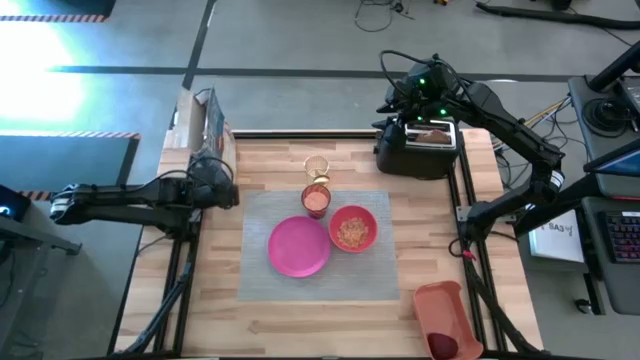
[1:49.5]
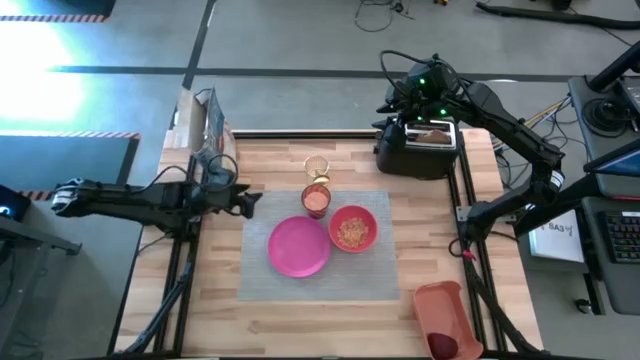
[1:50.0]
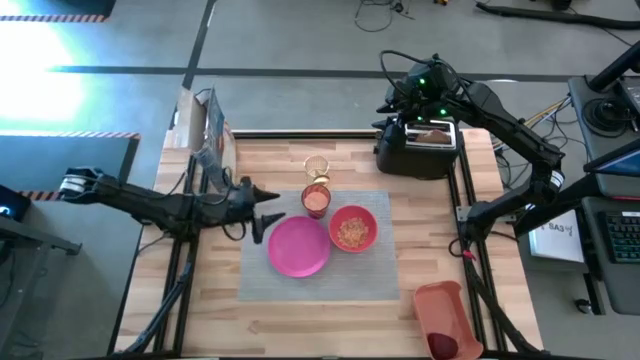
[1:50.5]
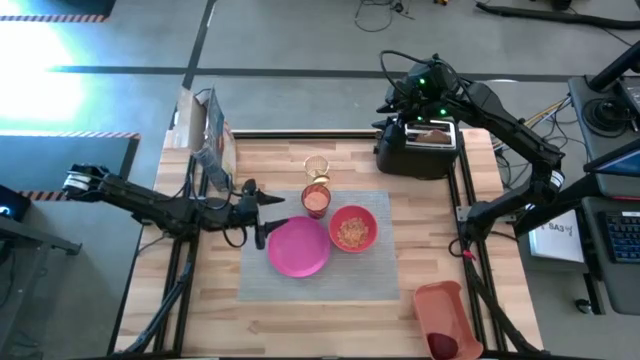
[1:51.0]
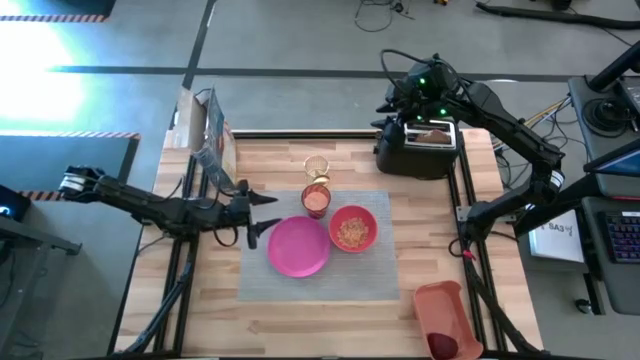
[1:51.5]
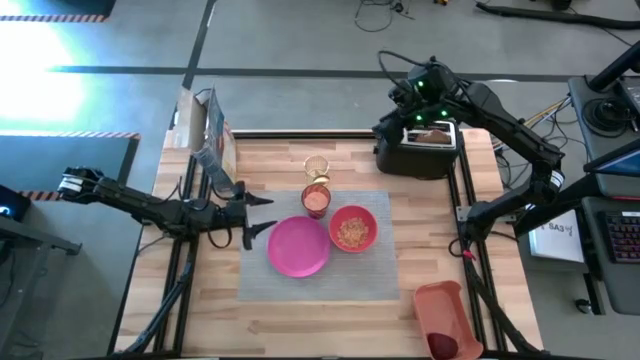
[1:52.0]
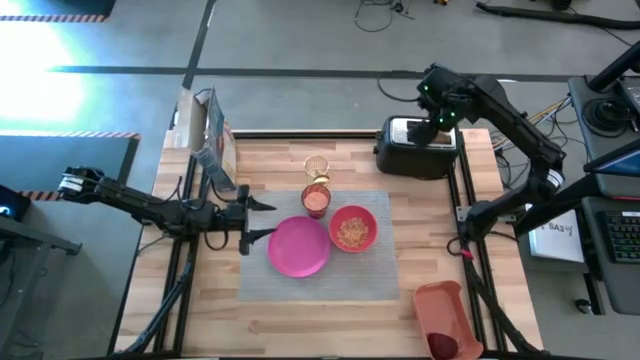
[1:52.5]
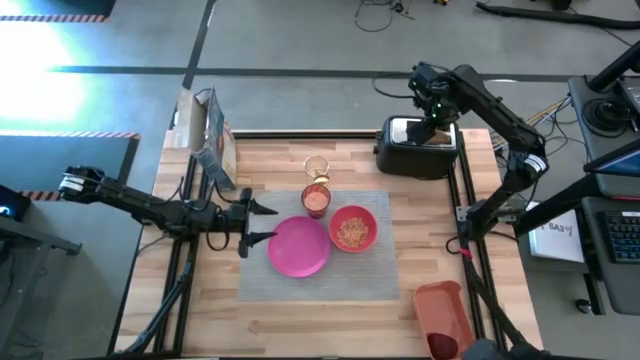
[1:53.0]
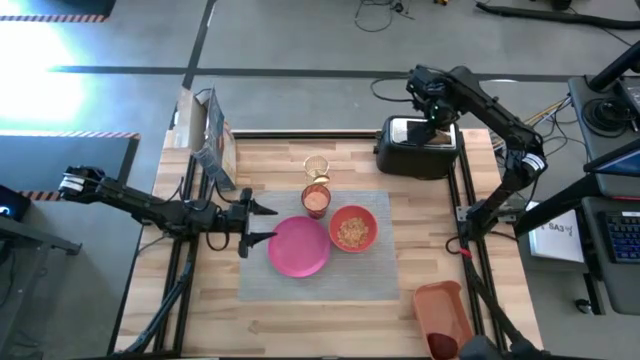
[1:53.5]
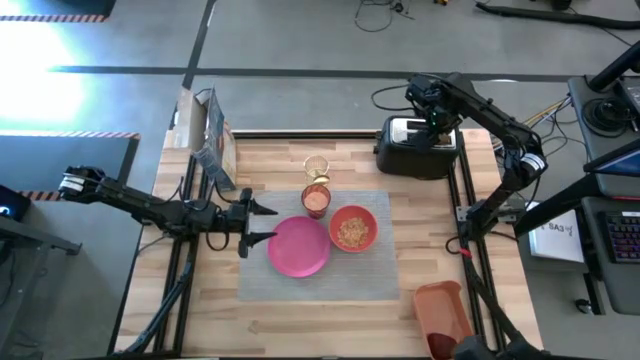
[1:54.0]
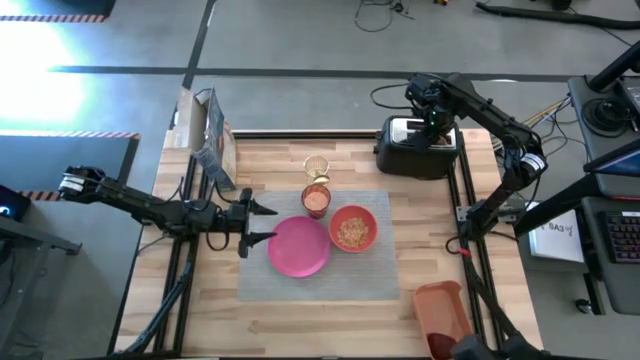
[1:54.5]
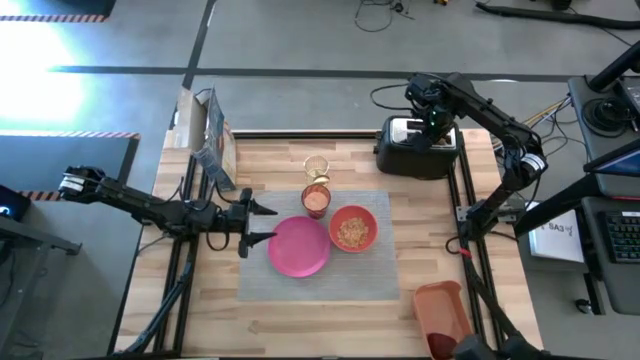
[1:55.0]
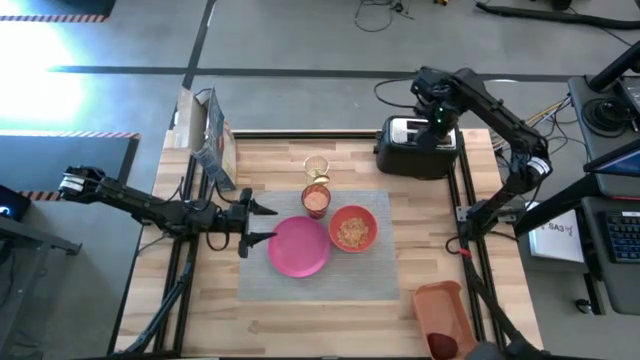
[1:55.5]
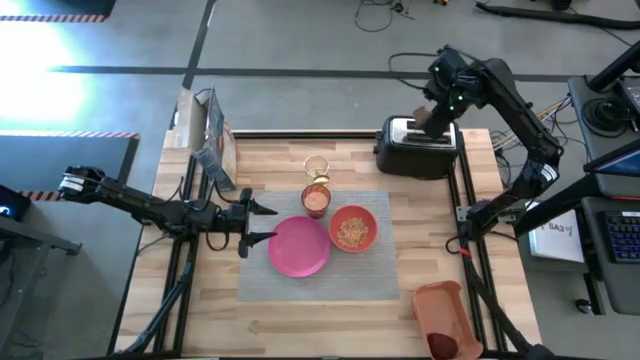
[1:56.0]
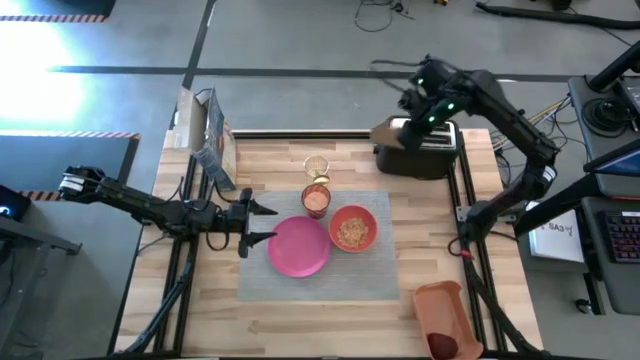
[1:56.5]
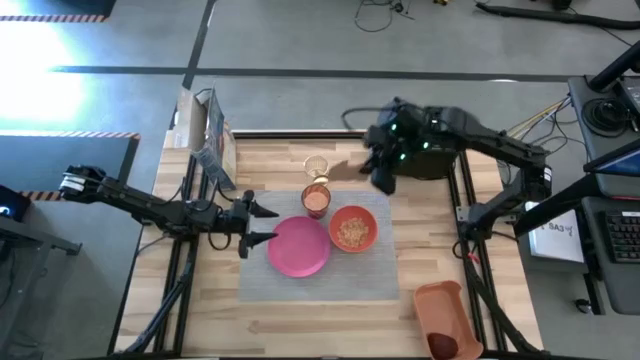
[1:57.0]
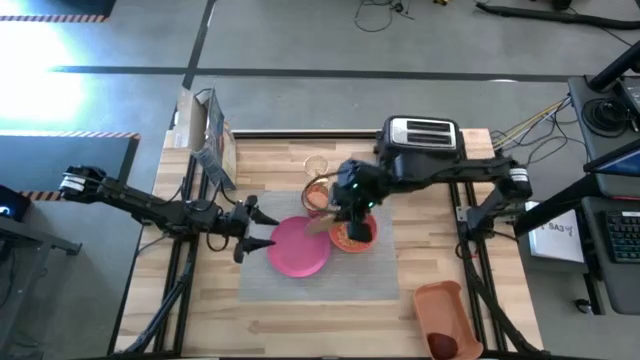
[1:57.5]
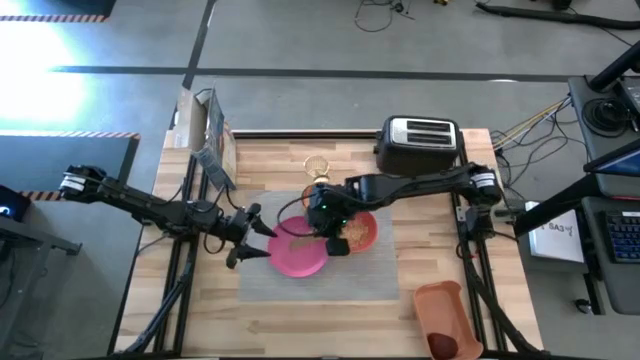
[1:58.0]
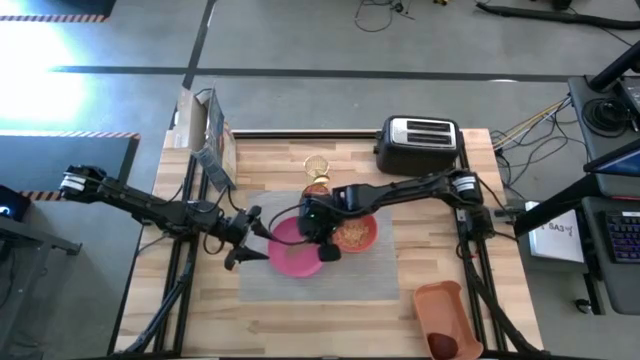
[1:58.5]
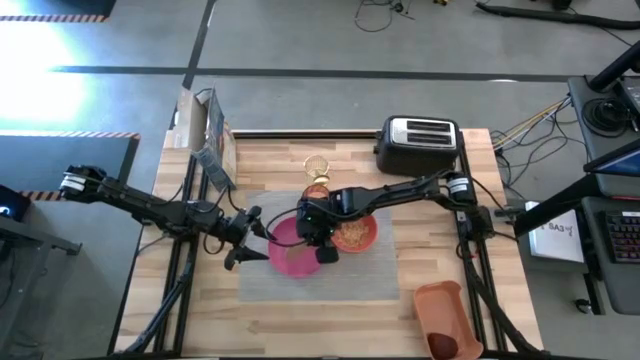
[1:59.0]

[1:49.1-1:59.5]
Task: Arrange a breakfast setting
Put the toasted bread from the toaster on the pink plate on the table mat

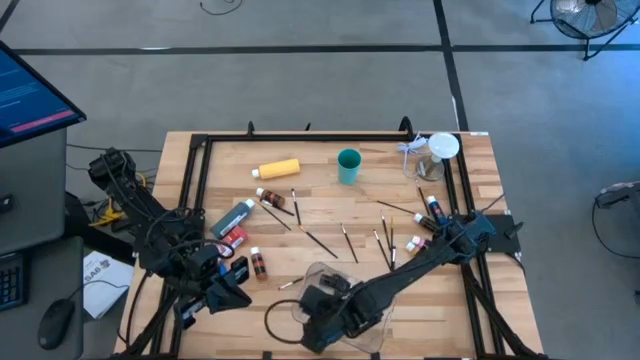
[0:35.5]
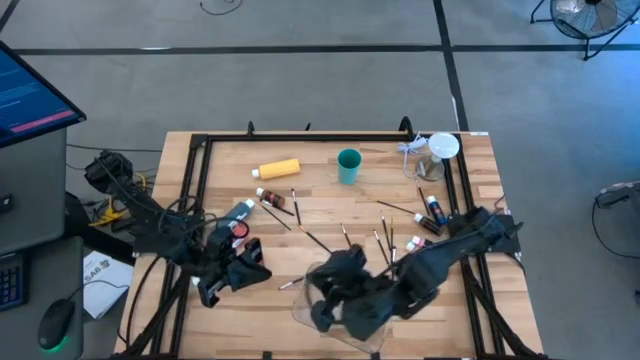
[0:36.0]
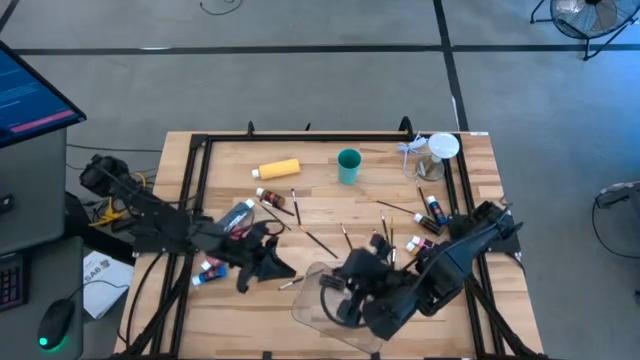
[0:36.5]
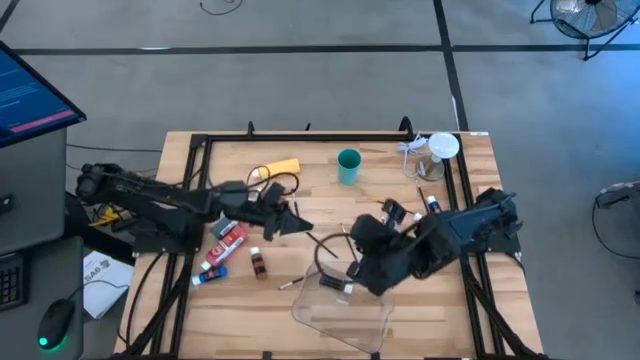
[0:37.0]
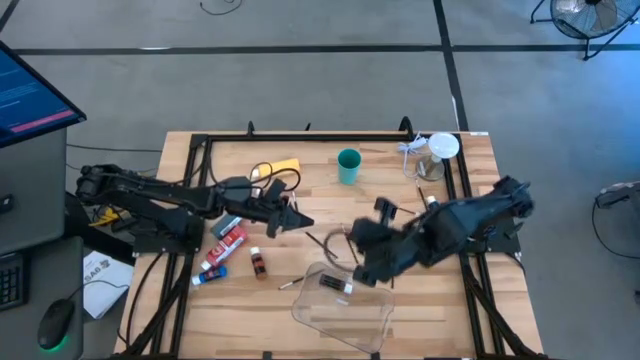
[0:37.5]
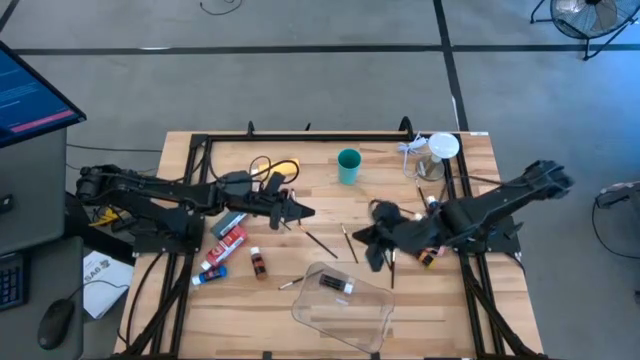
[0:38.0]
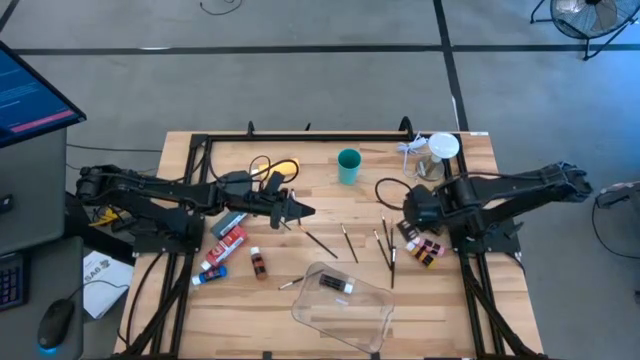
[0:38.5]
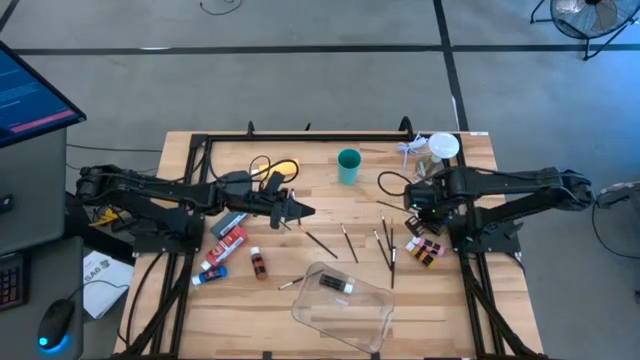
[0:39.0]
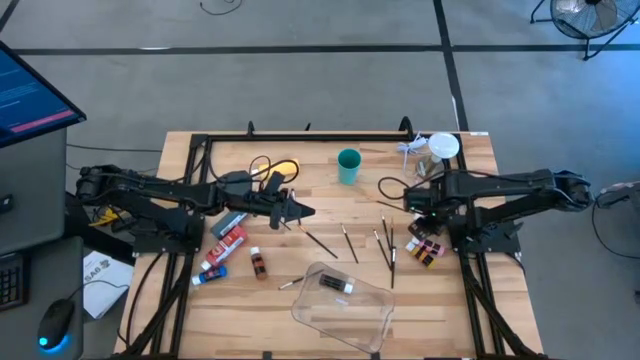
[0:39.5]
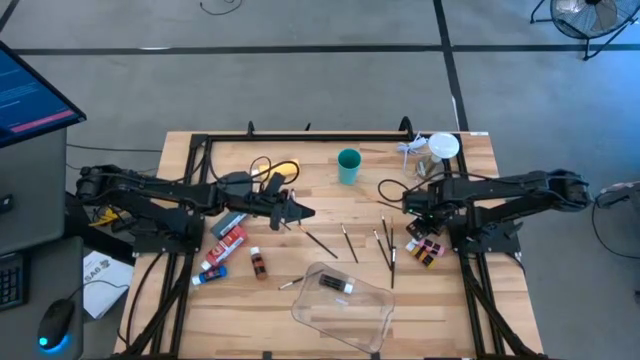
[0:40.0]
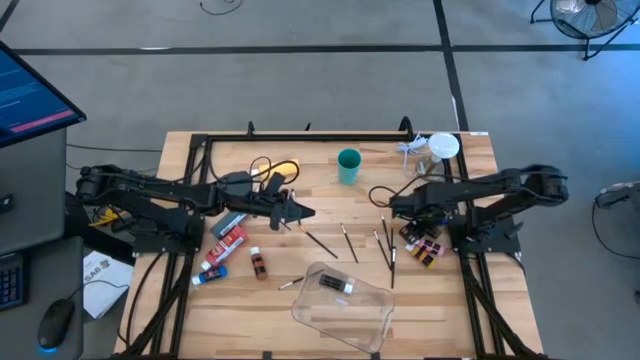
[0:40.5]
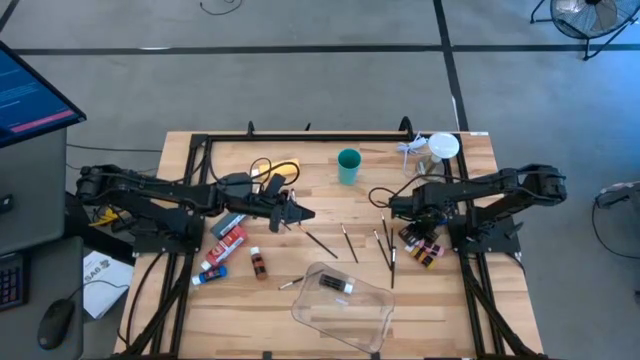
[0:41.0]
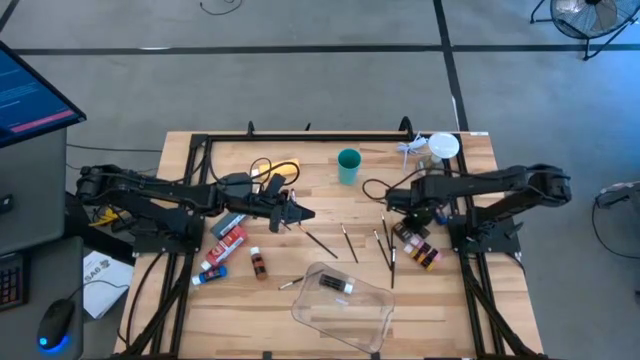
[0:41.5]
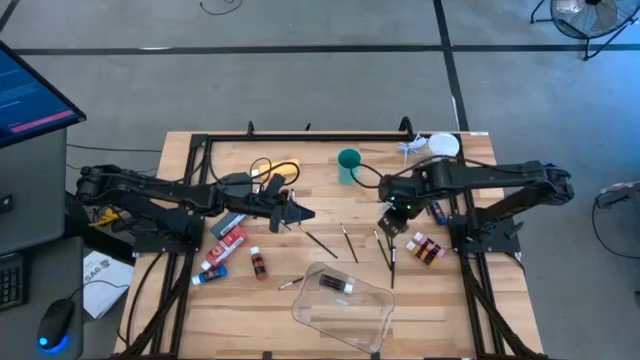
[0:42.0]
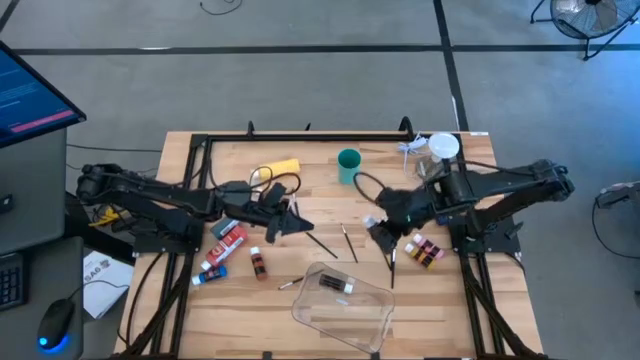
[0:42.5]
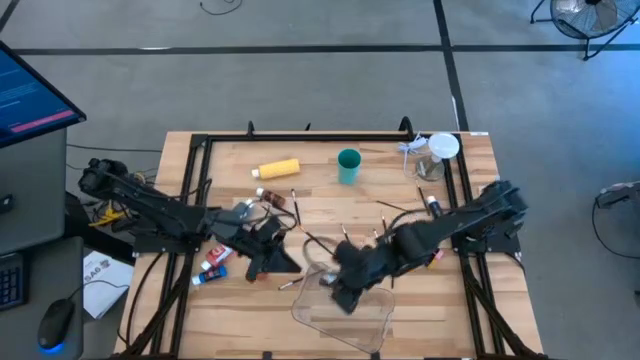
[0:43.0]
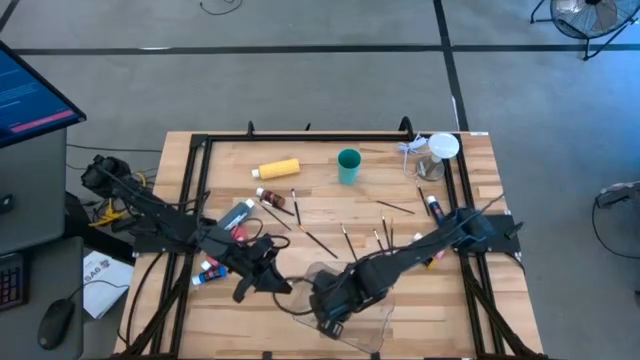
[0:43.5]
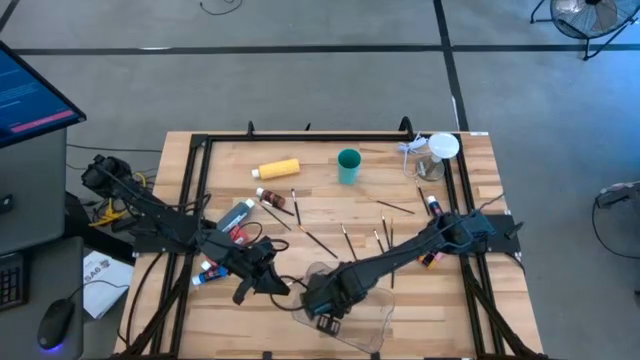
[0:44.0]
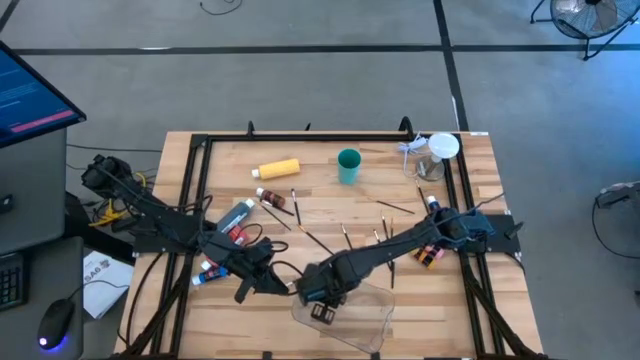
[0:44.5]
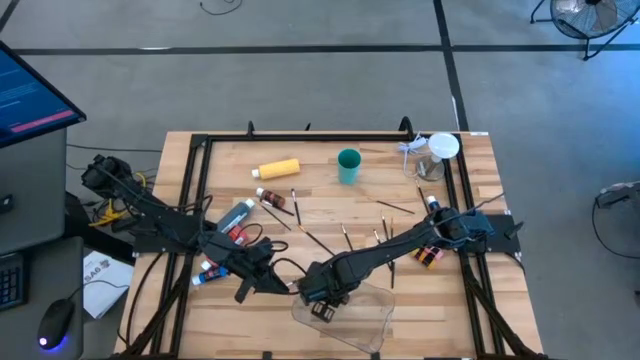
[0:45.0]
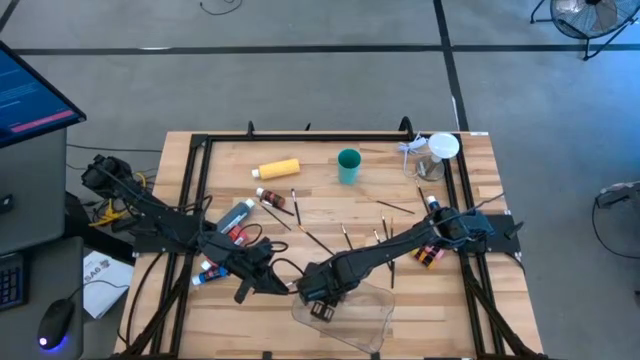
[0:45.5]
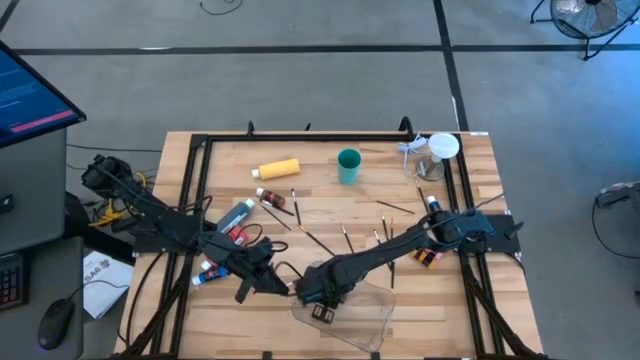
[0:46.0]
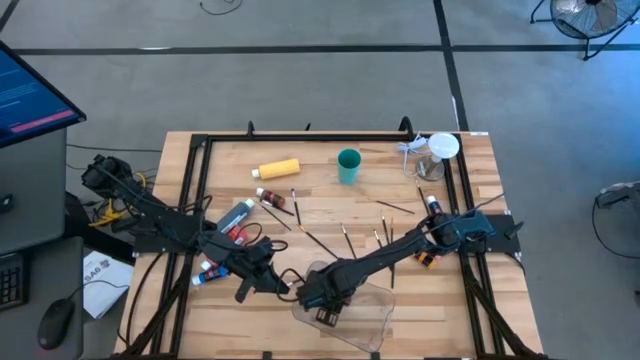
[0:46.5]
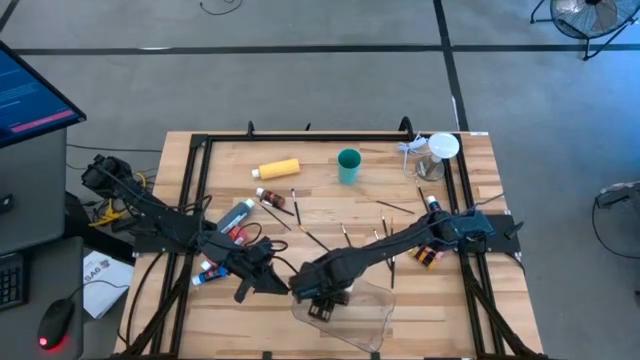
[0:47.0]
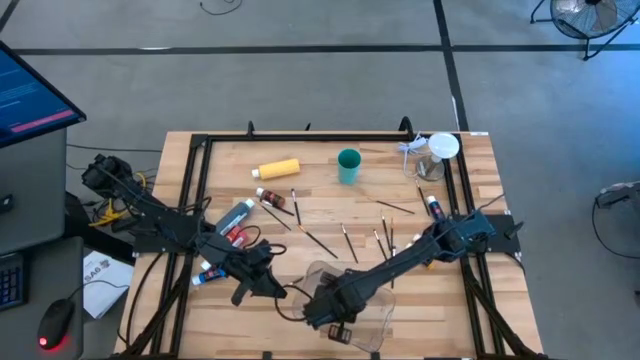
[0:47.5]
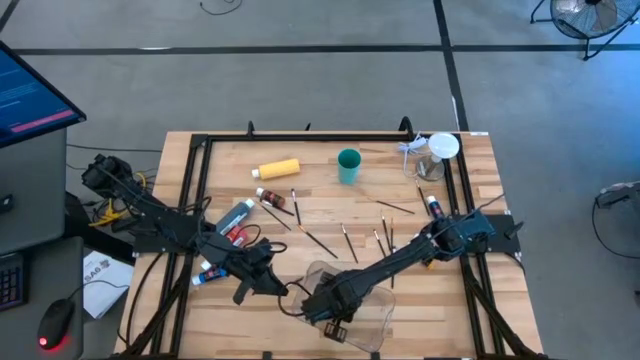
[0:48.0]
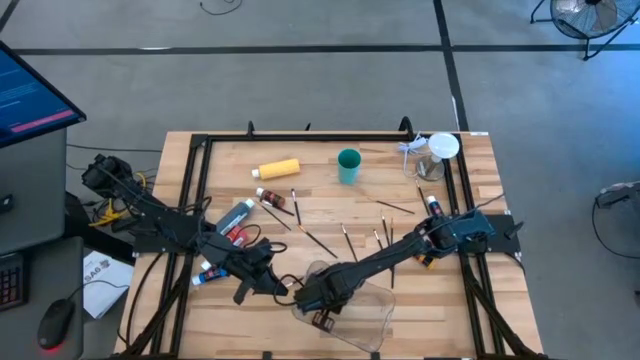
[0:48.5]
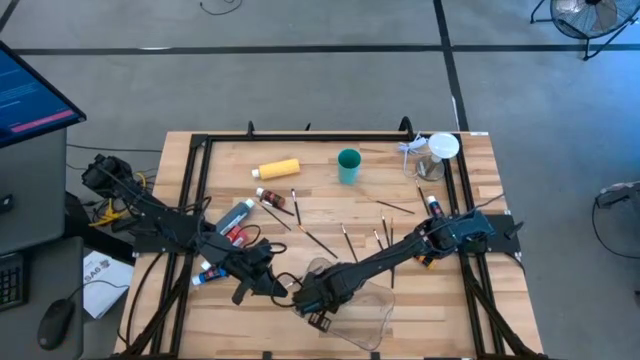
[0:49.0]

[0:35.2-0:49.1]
Task: Pick & Place Paint Supplies
Put the black paint bottle into the transparent bin
